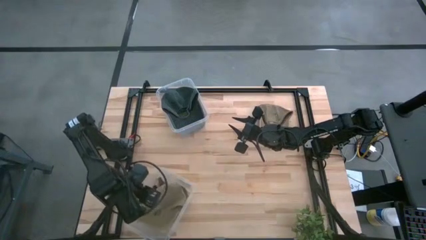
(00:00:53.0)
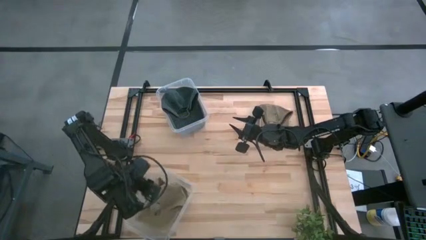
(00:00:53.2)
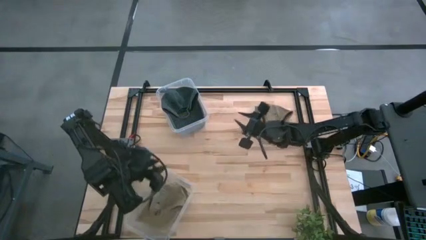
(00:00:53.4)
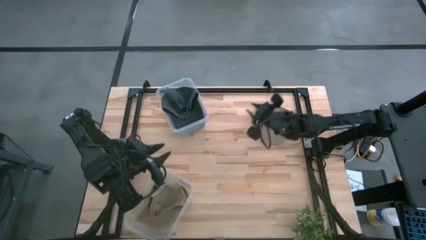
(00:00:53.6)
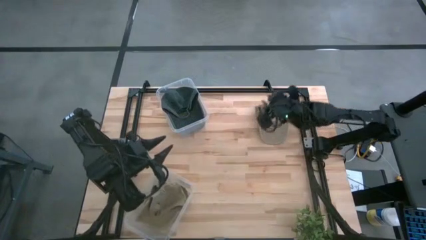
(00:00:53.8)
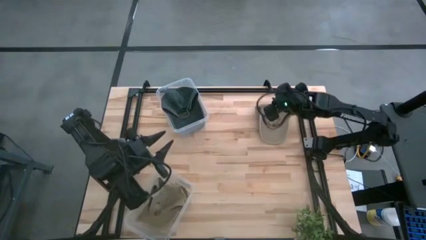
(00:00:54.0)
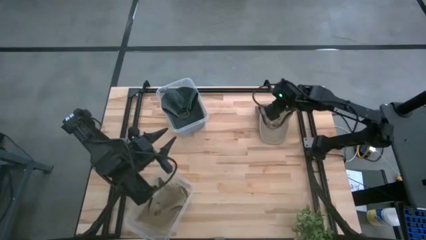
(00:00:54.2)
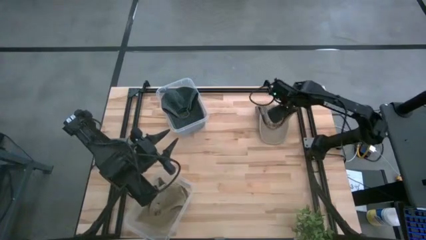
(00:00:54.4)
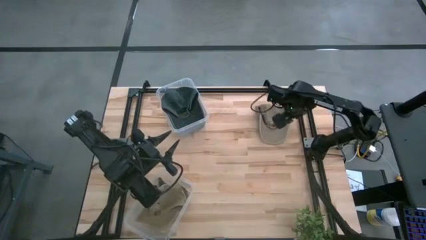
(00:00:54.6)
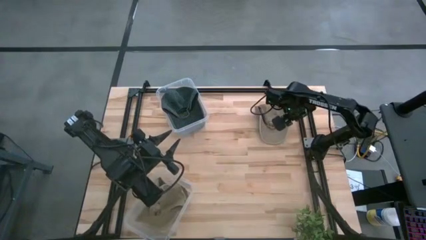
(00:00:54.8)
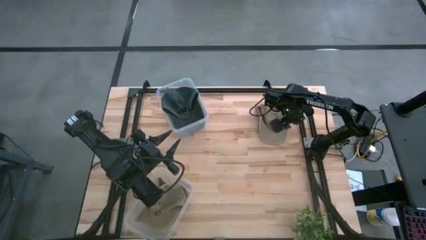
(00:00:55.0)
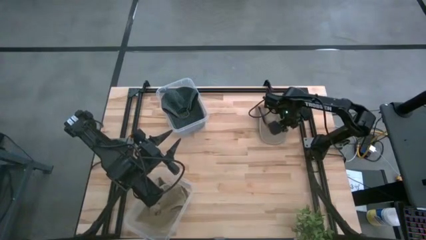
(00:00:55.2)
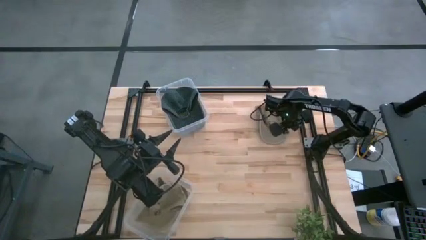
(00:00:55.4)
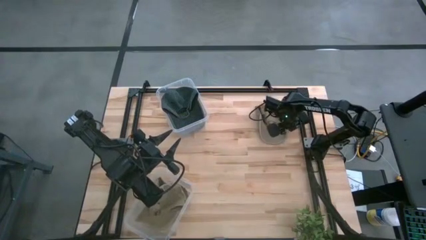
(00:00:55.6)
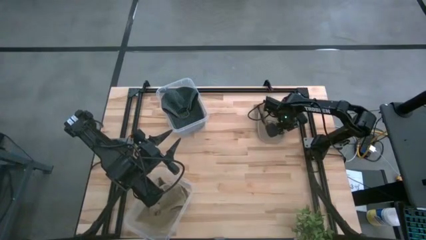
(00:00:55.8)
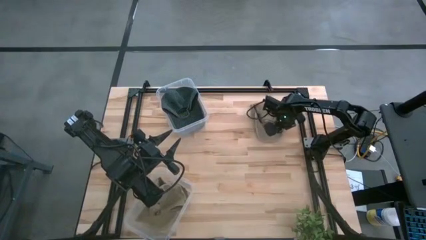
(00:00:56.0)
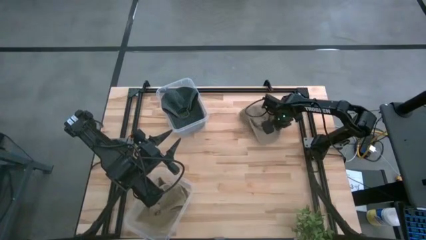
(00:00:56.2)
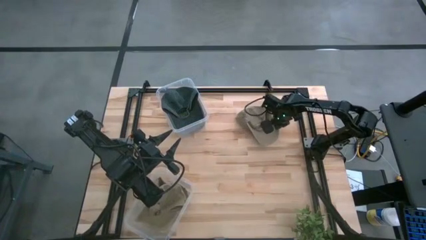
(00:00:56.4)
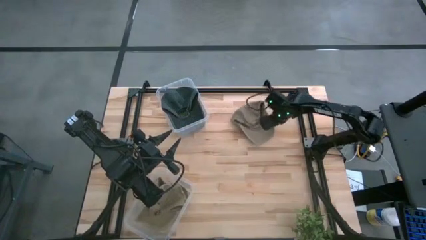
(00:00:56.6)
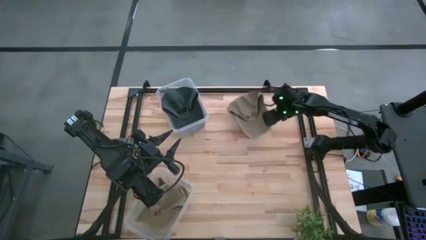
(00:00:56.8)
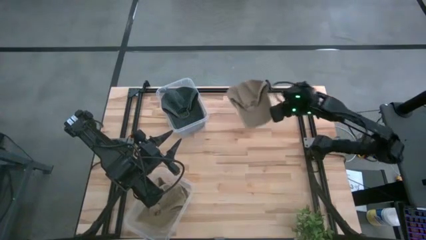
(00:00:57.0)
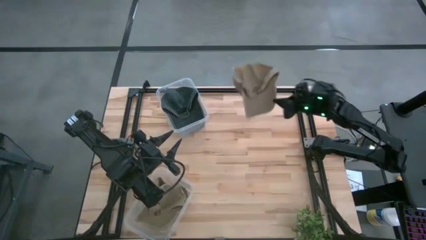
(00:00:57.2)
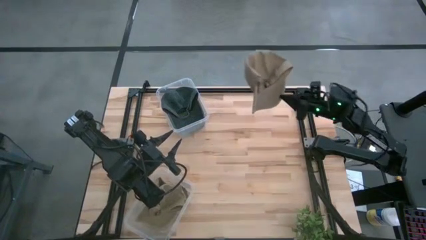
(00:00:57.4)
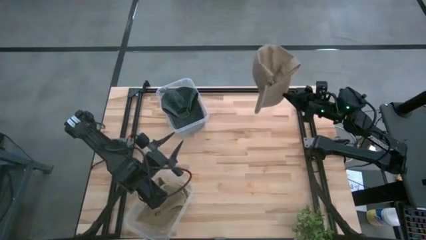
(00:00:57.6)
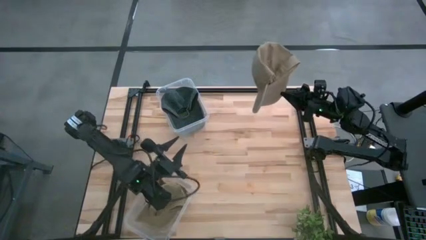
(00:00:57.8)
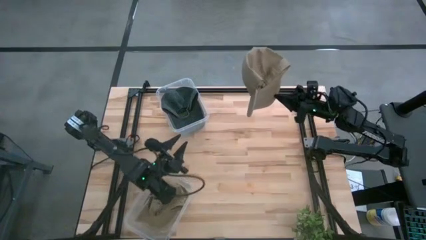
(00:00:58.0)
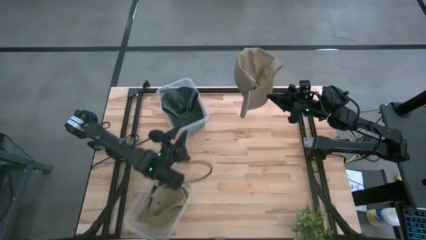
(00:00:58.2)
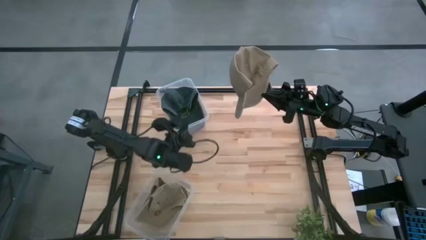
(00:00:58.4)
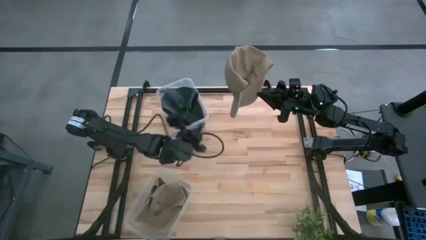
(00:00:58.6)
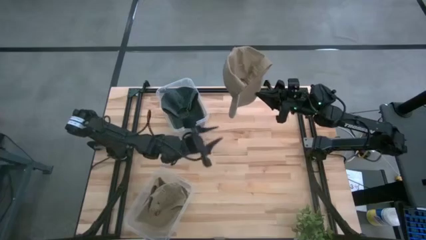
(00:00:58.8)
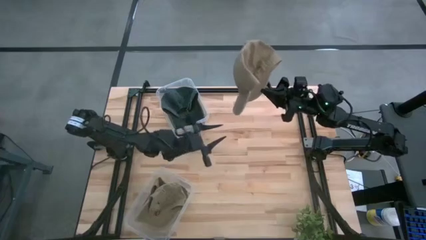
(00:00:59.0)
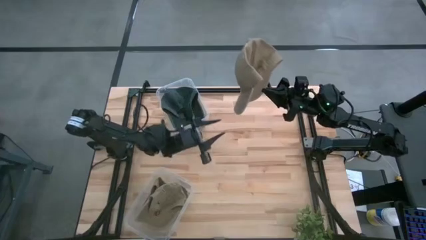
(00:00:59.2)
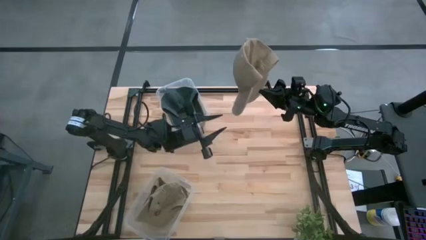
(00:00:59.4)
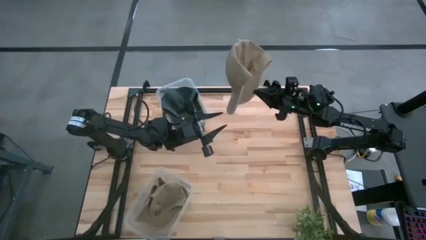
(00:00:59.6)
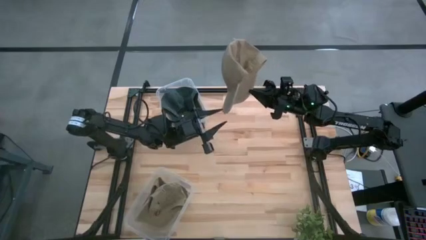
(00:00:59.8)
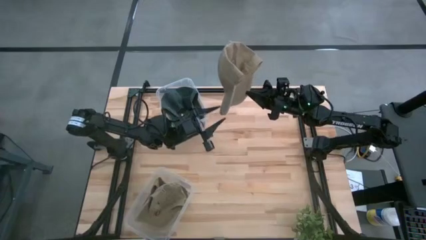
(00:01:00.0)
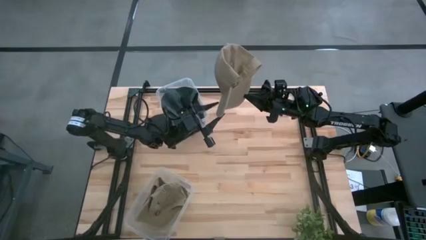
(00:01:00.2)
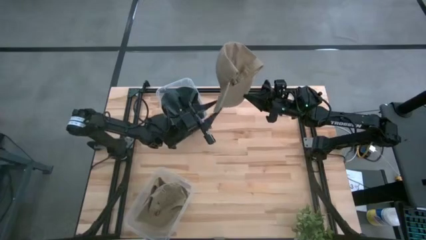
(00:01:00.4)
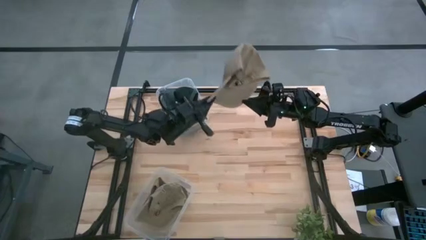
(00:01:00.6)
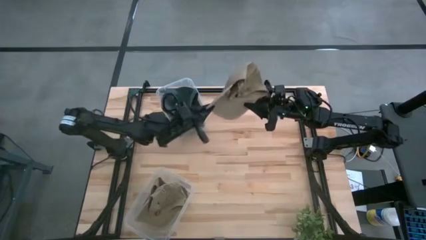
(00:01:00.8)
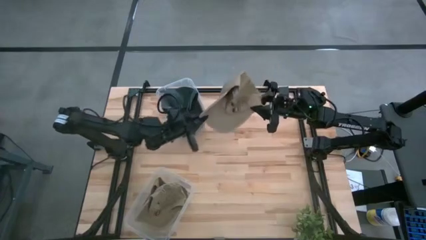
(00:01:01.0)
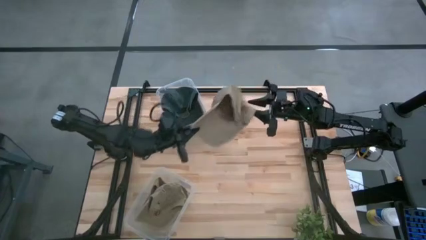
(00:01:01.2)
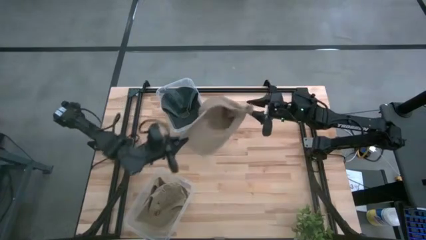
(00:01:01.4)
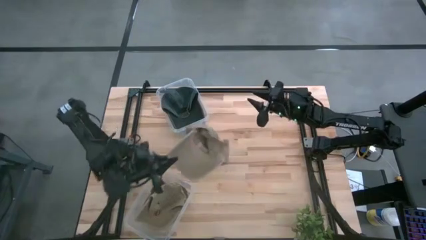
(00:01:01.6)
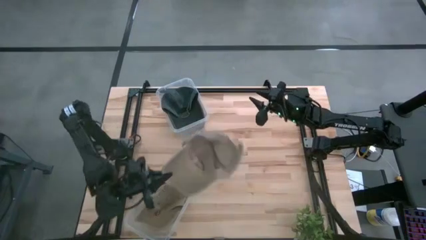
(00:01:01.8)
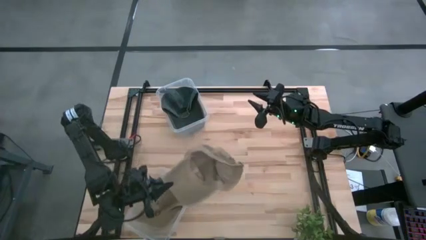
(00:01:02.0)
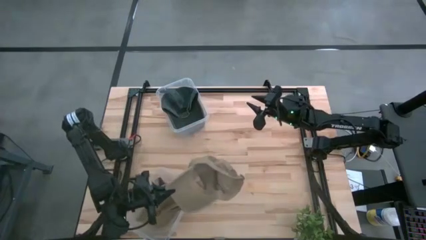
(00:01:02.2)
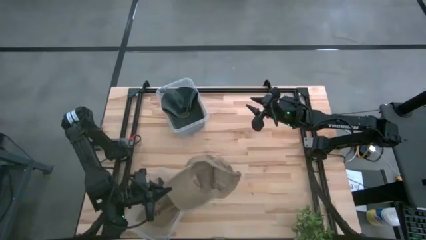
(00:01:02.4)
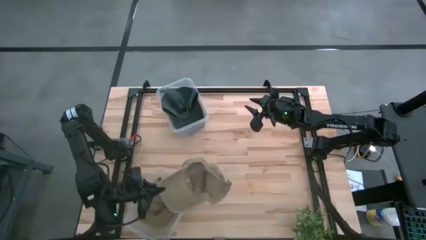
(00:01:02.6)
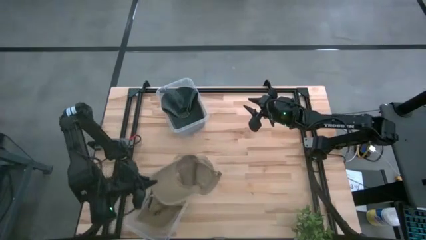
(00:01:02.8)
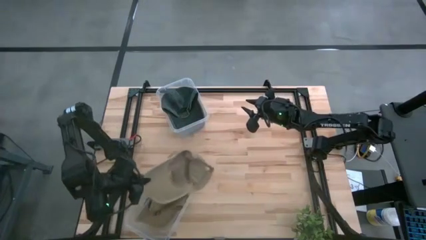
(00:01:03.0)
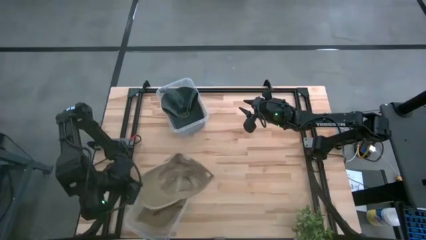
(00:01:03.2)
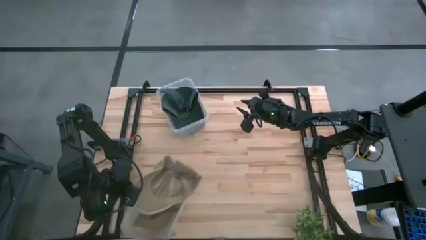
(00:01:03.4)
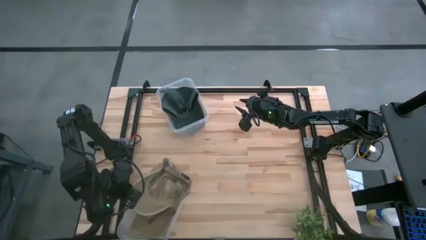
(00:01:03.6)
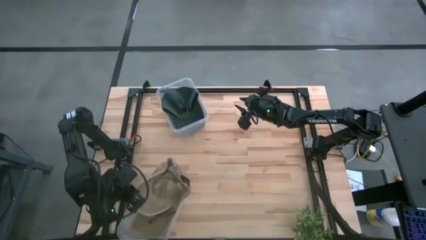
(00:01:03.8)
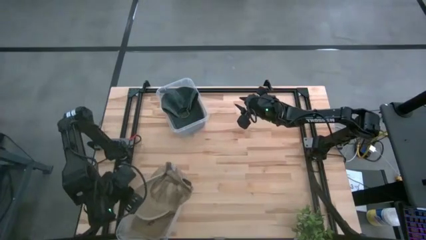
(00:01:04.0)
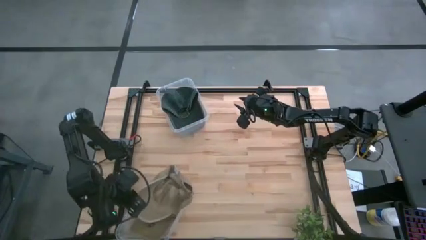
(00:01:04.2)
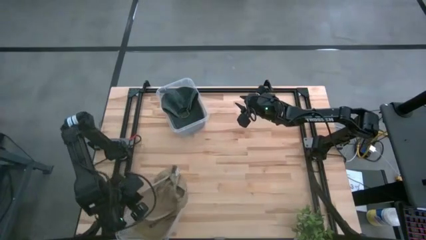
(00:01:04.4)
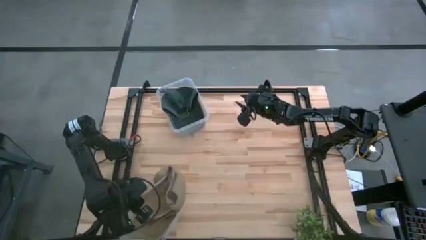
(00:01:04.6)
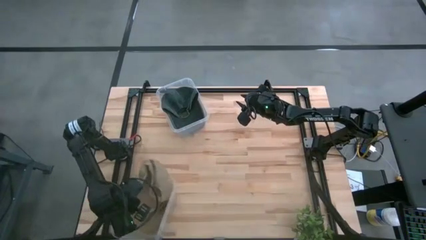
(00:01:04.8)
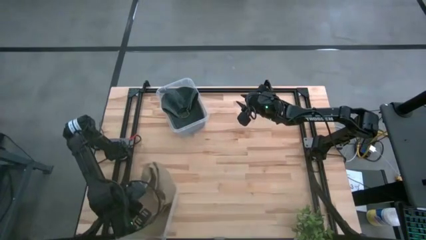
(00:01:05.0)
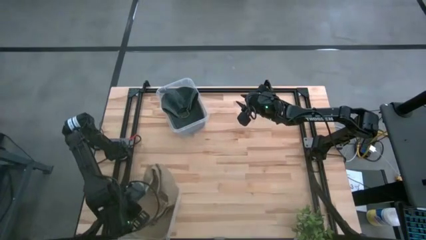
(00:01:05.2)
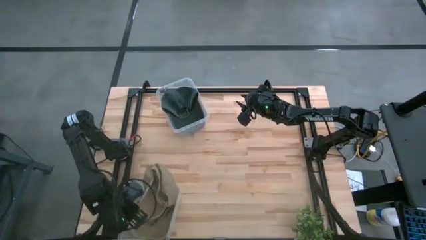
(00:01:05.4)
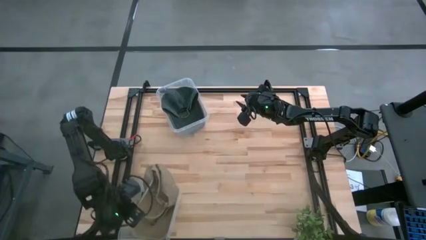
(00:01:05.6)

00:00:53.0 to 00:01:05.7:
Task: Pick & Place hat
Put the brown cap into the bottom transparent bin

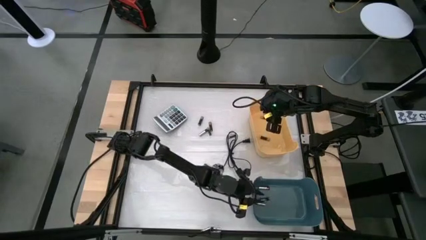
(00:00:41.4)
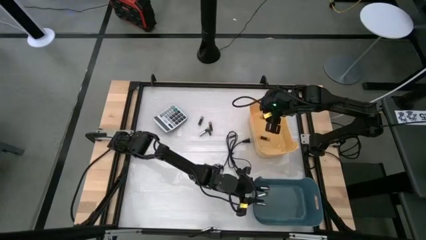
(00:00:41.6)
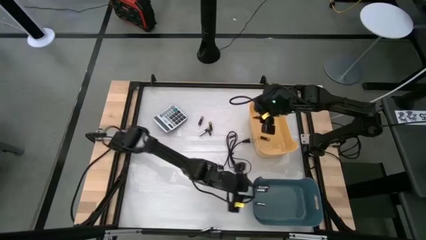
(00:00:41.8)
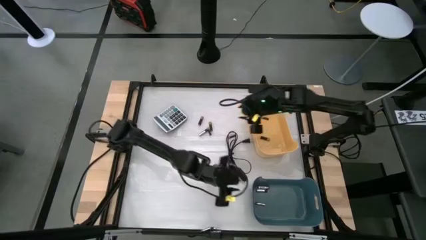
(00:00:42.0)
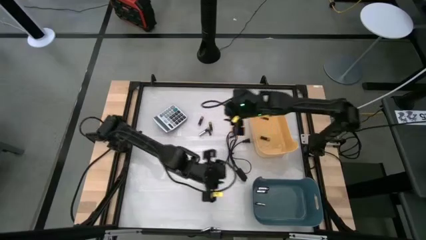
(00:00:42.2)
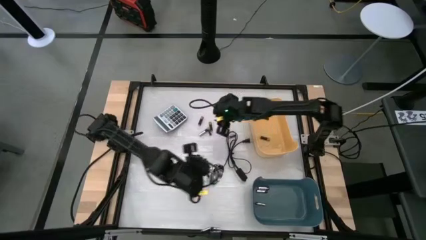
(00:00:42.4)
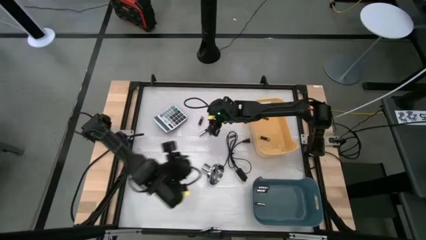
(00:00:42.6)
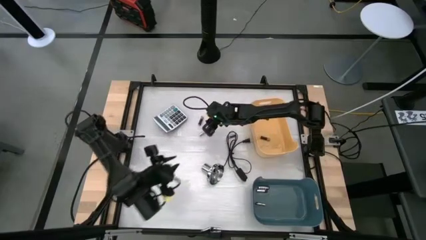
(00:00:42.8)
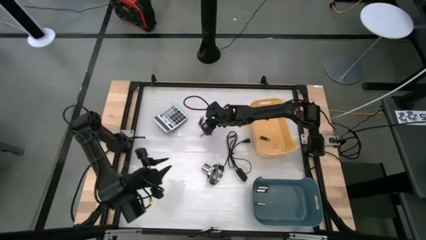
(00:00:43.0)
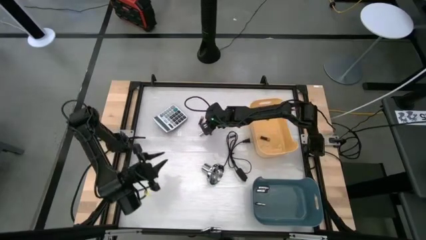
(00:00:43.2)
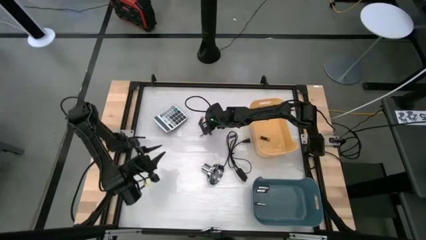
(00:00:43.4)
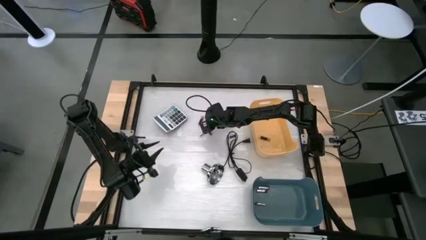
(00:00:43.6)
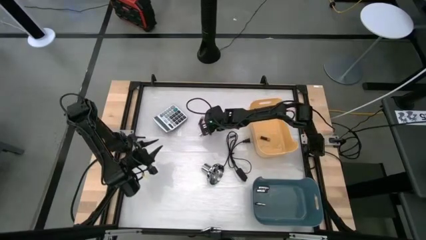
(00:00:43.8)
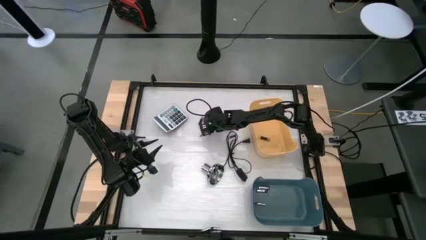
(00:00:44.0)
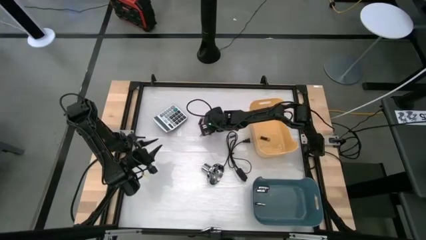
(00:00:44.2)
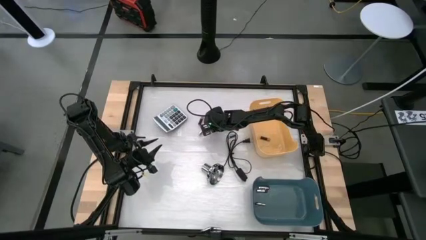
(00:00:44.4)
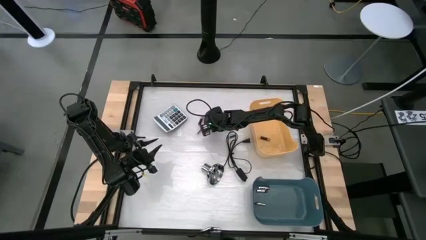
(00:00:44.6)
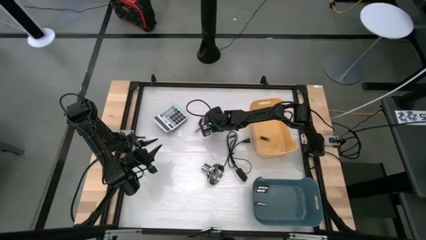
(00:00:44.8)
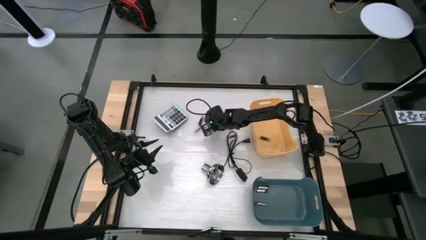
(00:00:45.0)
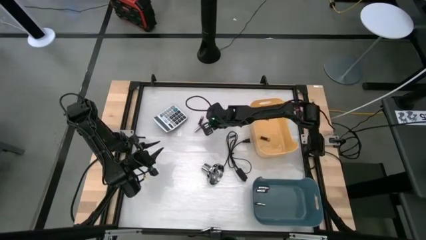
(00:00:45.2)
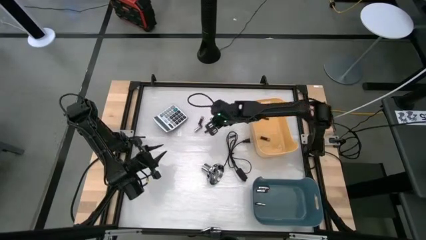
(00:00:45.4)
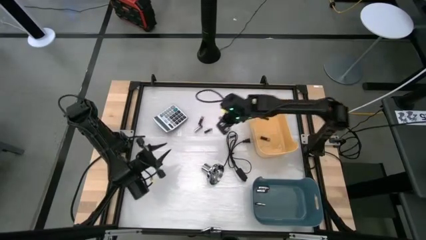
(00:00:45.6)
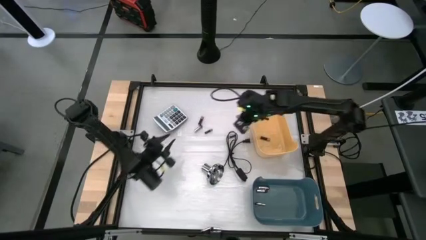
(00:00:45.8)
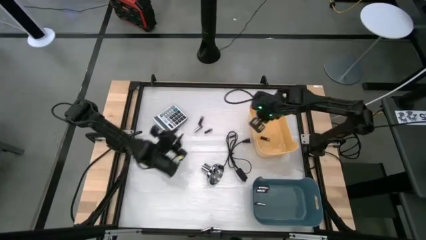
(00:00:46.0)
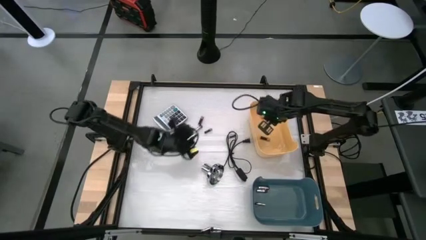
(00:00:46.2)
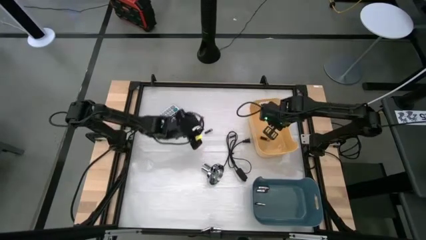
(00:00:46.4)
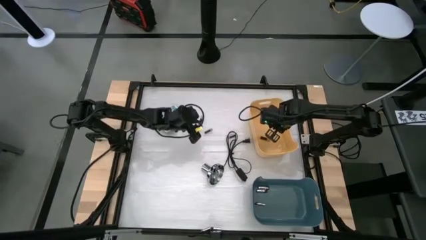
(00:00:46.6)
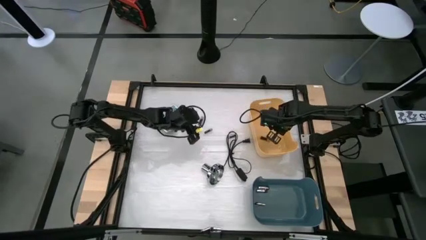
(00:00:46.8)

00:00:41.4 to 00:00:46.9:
Task: Sort batteries
Put the black battery into the yellow bin
